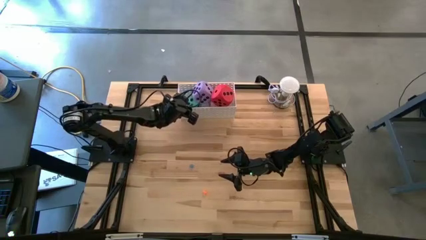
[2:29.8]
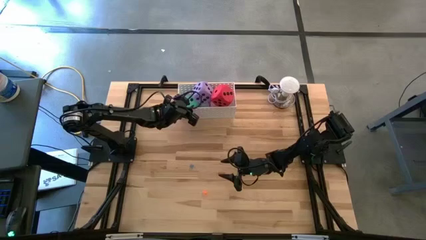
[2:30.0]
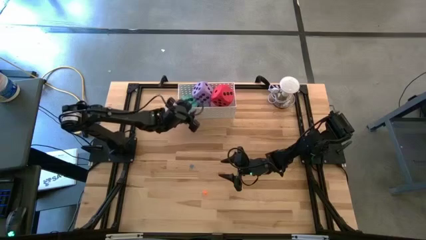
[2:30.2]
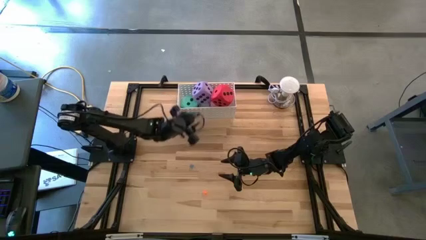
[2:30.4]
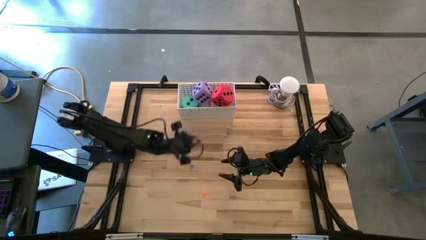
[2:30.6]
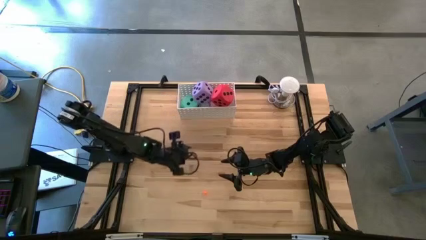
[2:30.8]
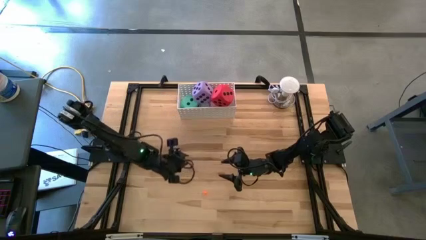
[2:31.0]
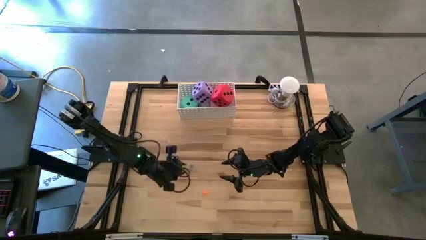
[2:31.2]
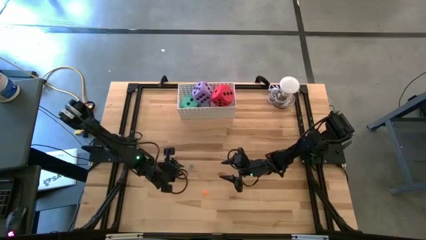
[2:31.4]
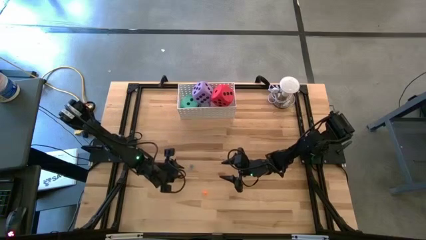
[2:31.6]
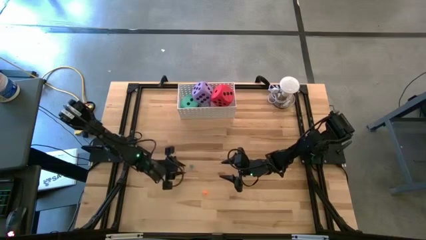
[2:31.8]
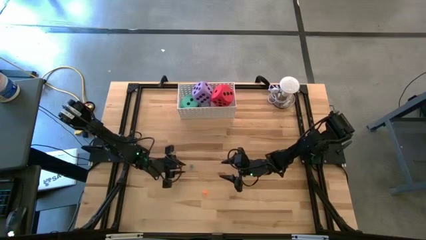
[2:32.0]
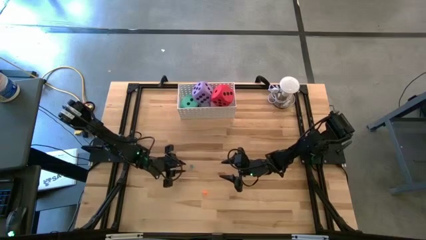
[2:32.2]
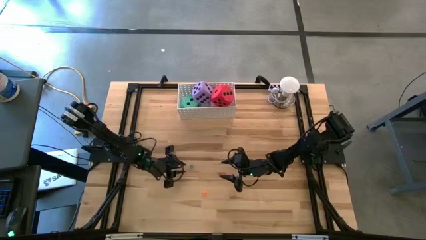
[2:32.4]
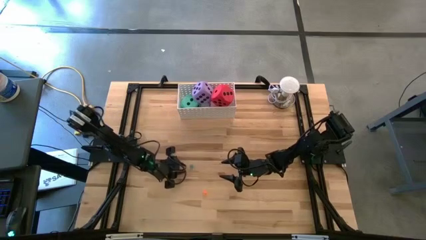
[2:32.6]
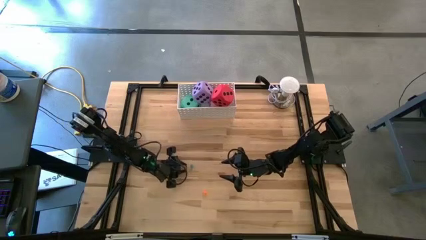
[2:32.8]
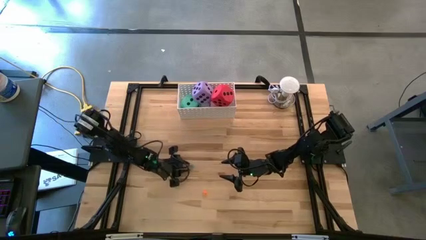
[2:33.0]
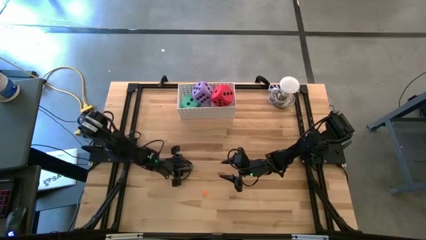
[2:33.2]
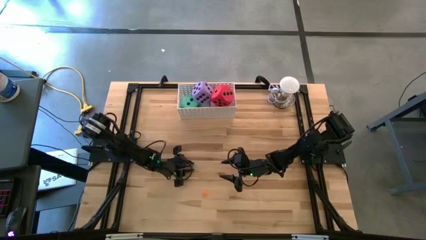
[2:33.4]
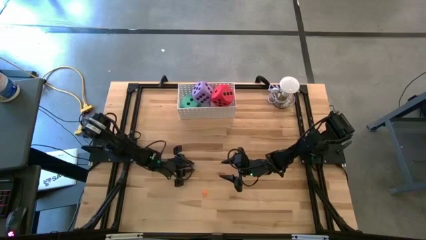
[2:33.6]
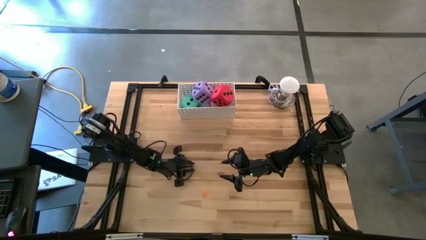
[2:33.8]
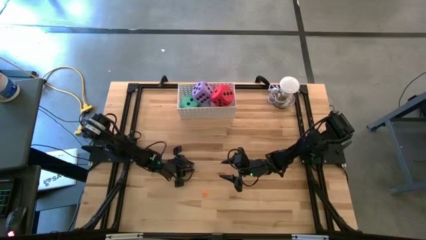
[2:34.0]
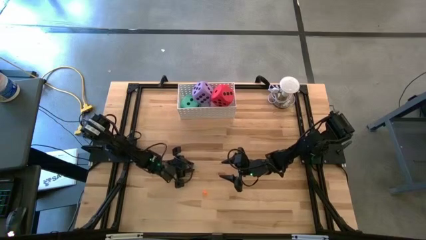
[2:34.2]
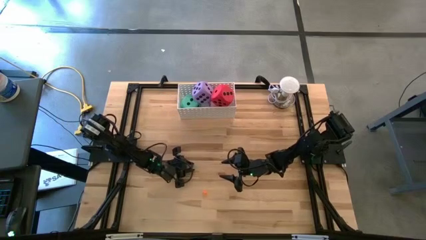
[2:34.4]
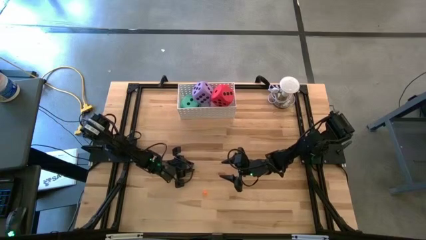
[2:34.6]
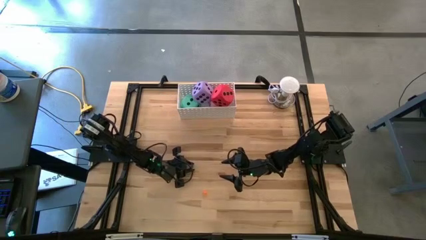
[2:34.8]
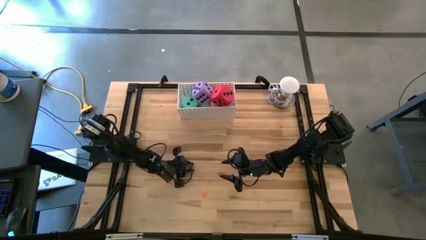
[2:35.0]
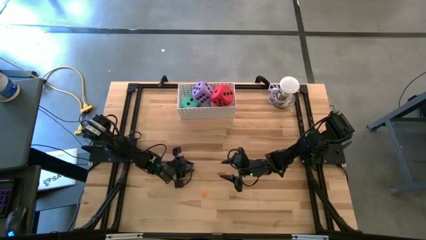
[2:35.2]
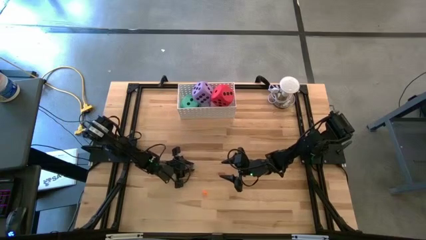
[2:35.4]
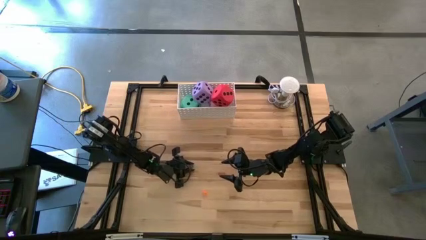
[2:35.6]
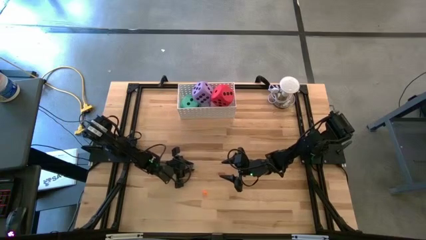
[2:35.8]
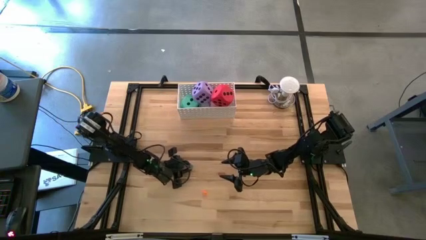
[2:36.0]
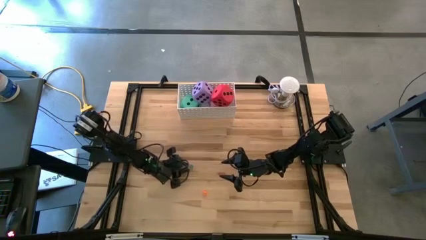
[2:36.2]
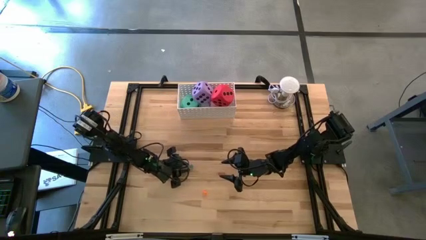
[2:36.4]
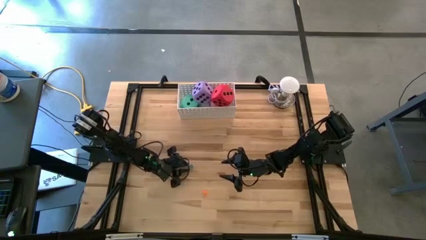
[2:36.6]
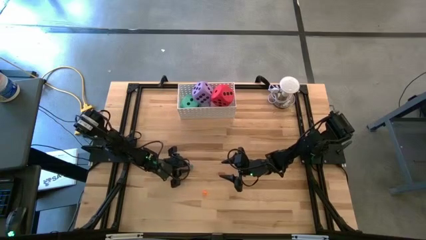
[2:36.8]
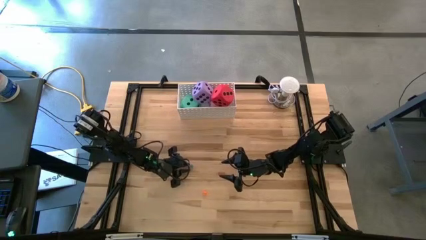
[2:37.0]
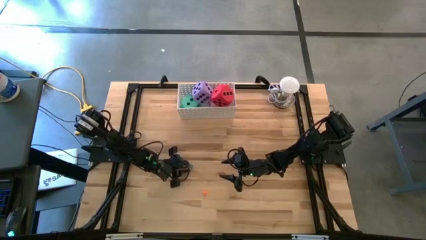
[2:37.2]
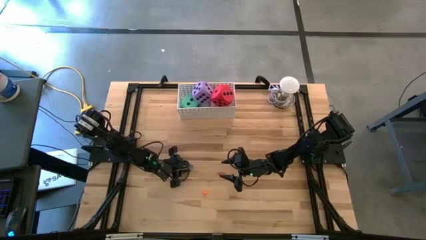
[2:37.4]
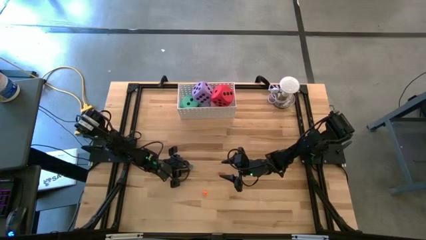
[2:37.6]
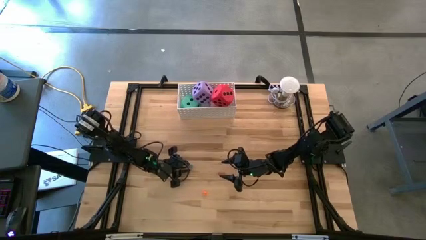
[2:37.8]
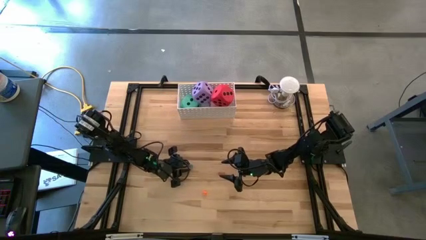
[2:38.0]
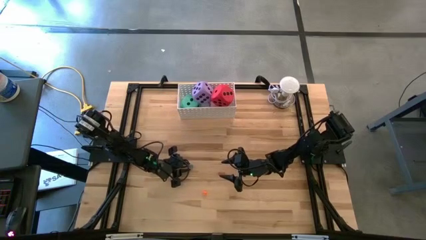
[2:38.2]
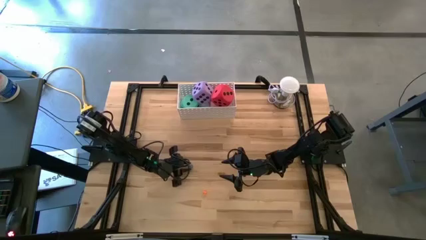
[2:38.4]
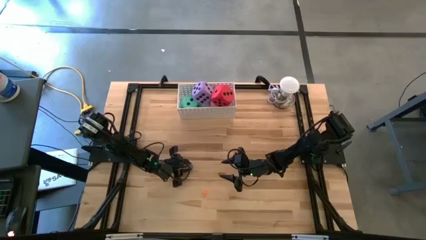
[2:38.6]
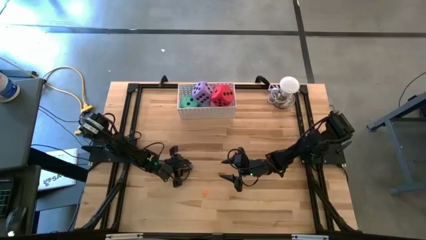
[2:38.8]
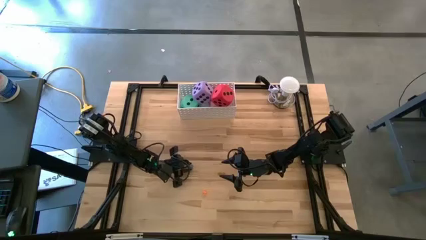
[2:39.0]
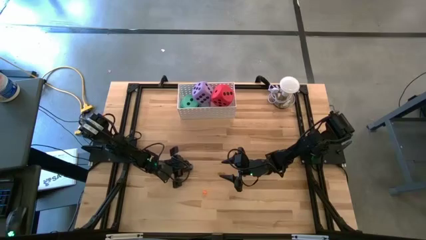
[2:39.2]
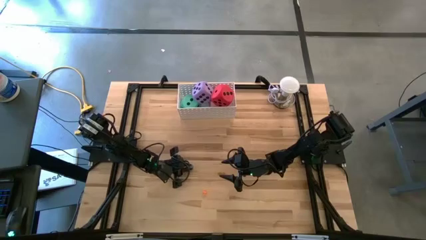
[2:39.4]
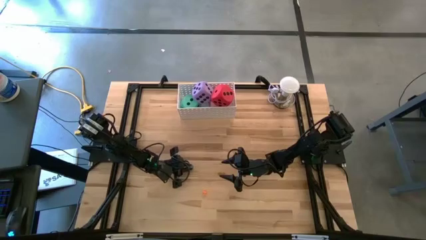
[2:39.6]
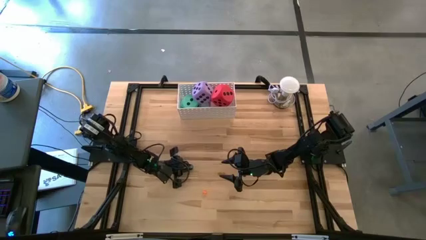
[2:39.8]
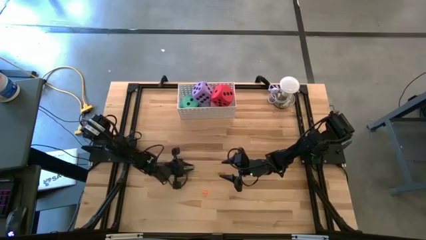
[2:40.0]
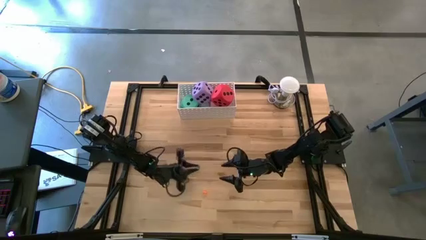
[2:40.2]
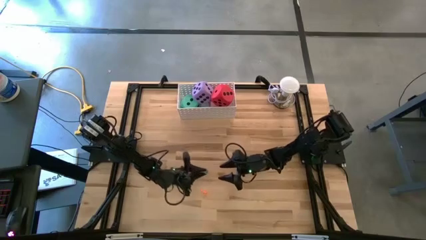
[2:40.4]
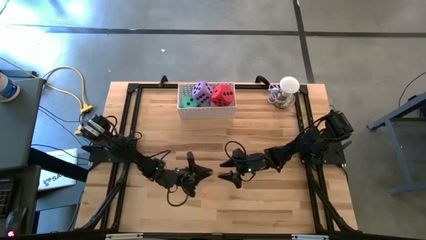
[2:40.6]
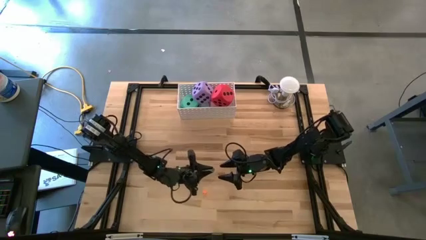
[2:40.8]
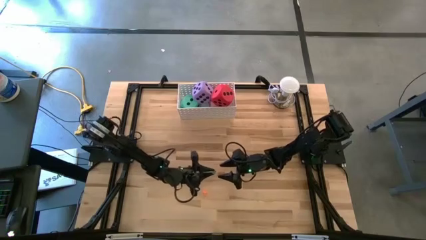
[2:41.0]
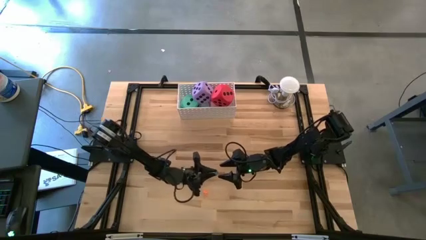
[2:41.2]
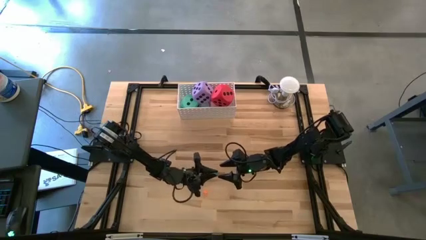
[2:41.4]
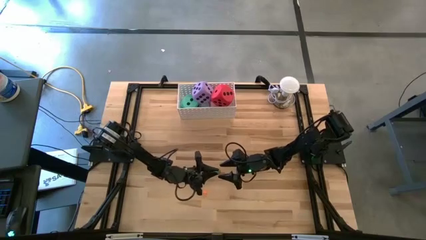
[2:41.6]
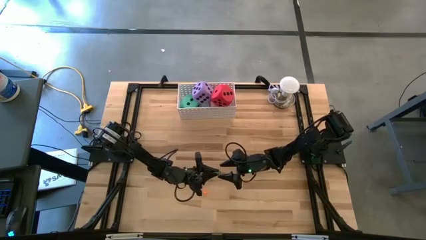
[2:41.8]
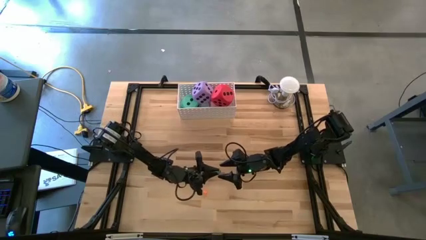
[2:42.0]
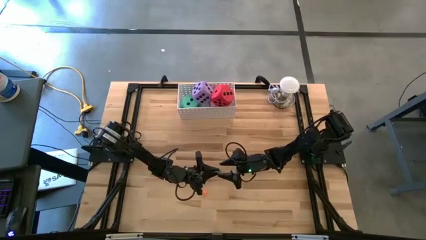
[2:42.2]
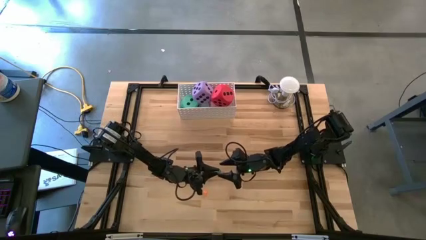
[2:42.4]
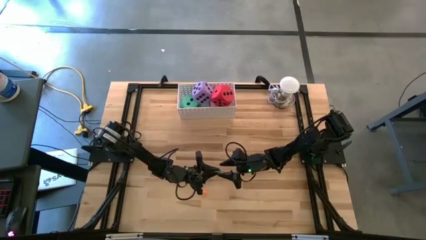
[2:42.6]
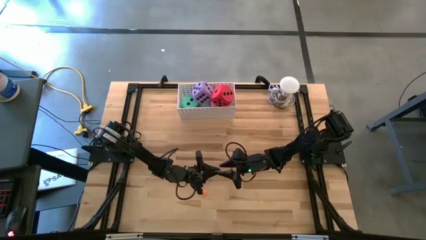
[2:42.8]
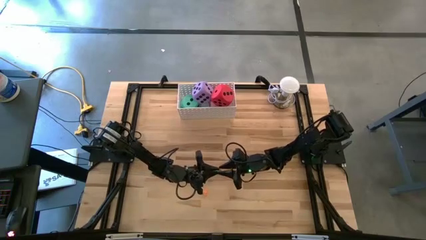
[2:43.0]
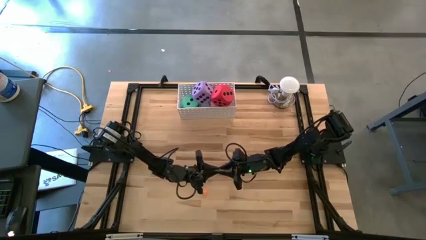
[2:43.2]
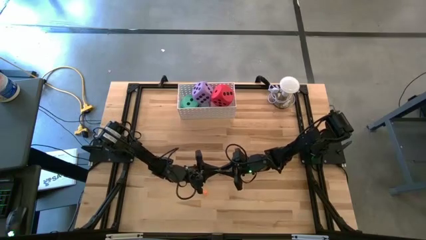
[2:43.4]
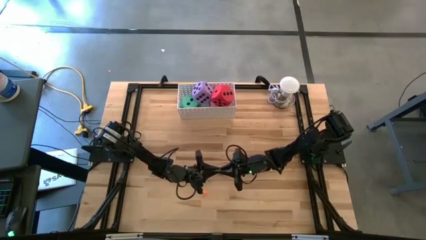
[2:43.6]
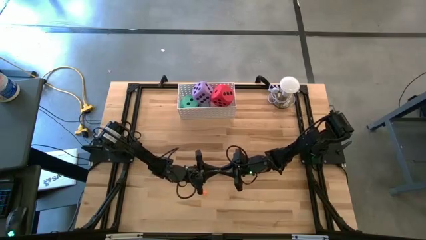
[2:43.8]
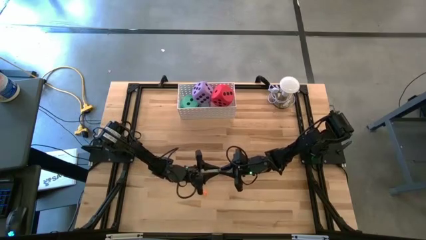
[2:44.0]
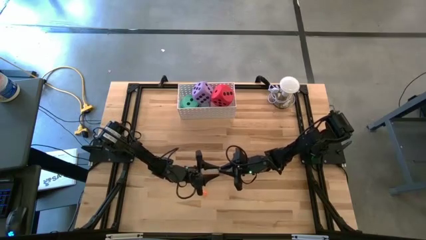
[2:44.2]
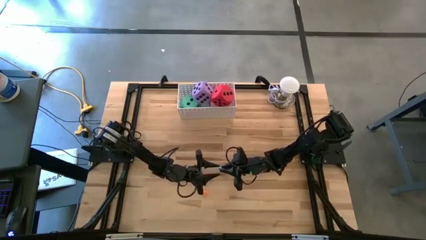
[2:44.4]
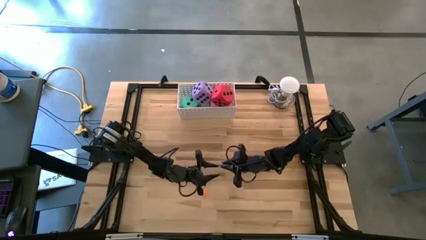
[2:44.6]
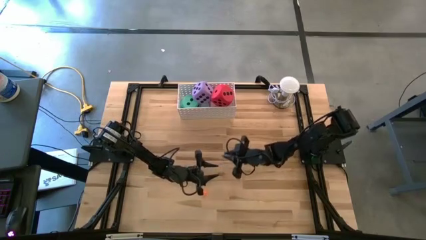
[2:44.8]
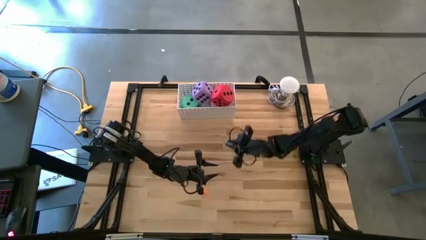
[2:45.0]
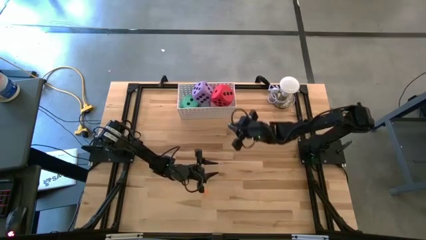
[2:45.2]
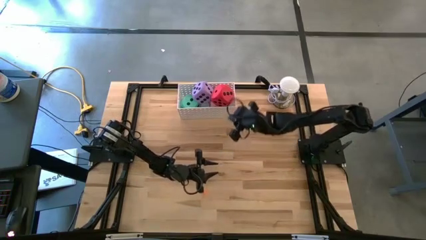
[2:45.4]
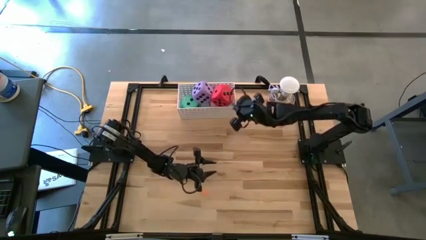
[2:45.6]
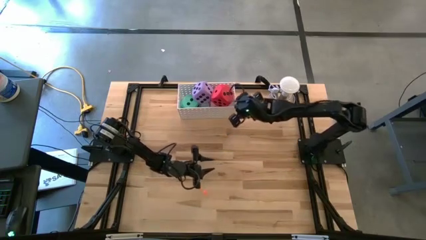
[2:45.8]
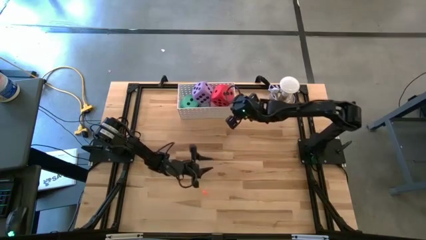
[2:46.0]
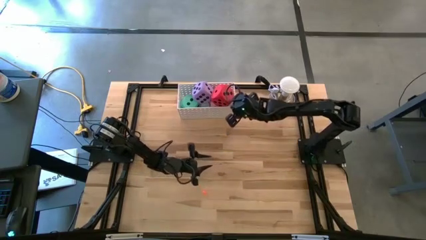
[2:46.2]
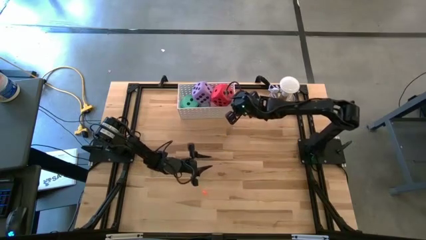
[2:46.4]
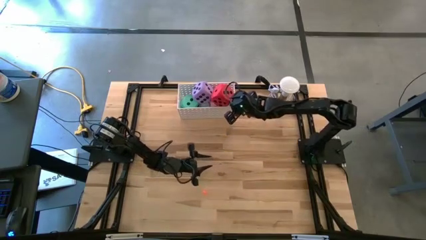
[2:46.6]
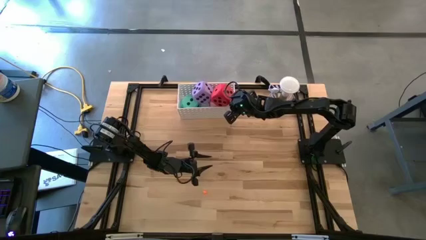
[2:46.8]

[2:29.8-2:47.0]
Task: Pick & Place Dice
Put the small blue dice into the white basket
